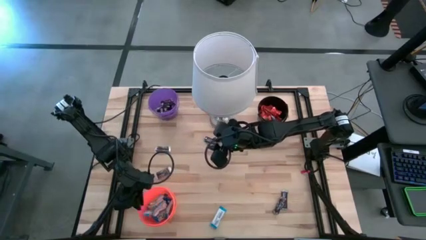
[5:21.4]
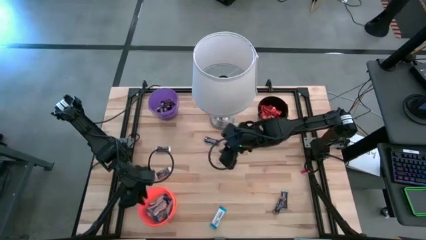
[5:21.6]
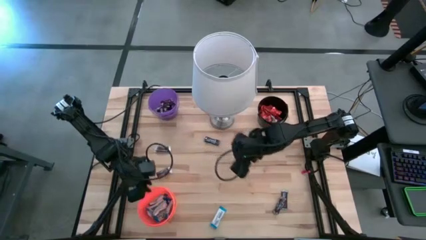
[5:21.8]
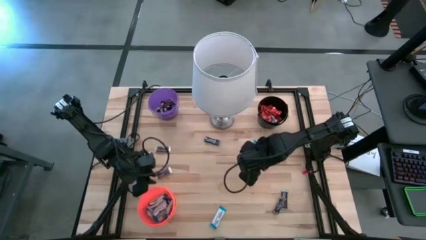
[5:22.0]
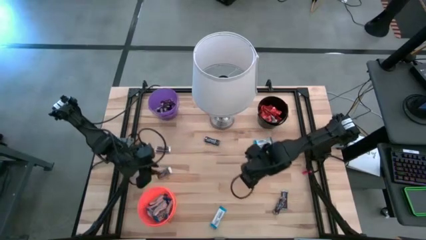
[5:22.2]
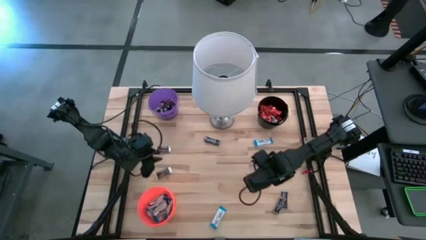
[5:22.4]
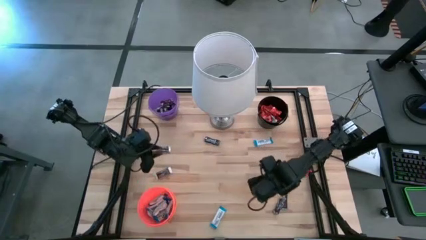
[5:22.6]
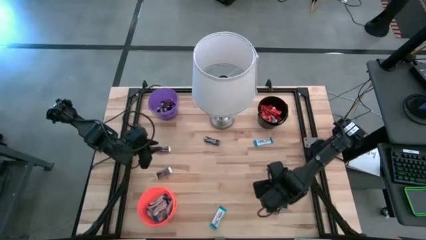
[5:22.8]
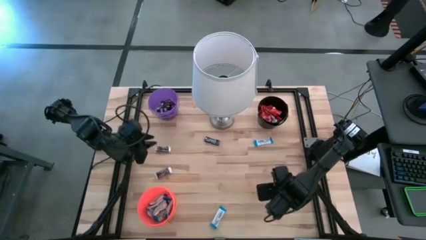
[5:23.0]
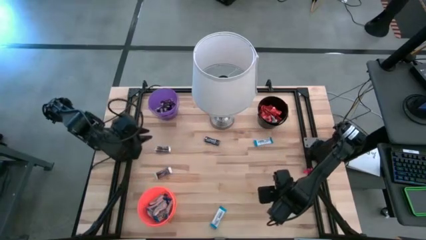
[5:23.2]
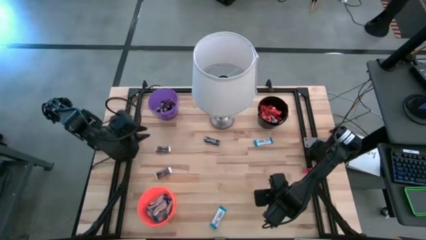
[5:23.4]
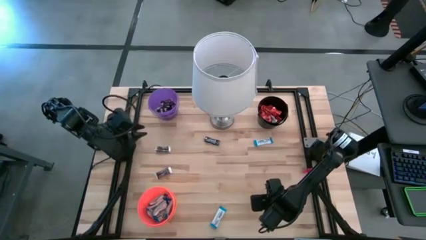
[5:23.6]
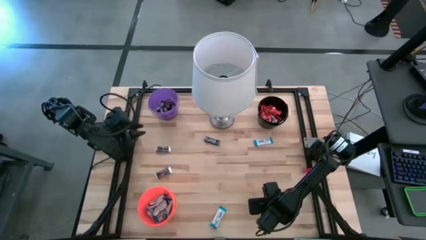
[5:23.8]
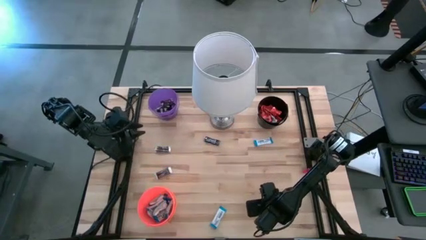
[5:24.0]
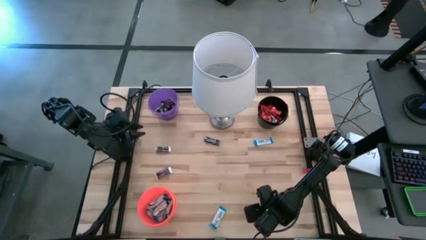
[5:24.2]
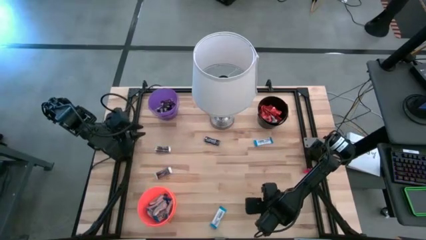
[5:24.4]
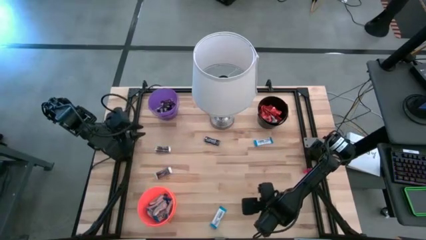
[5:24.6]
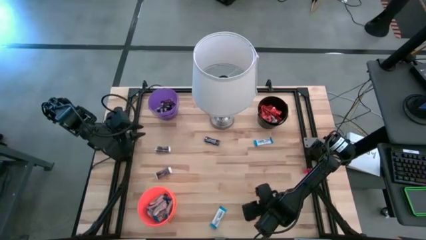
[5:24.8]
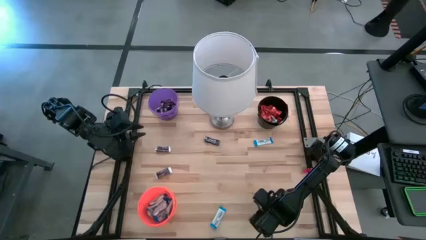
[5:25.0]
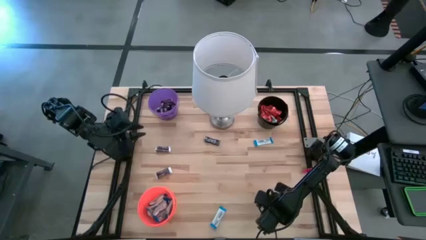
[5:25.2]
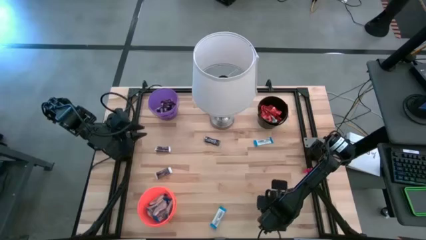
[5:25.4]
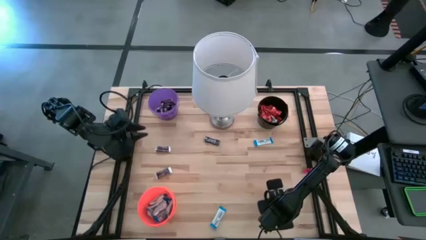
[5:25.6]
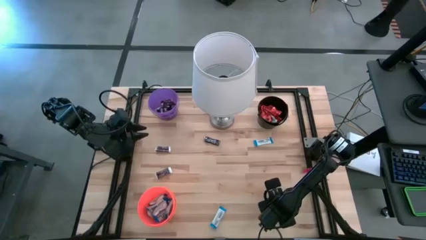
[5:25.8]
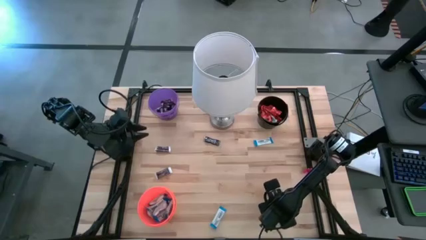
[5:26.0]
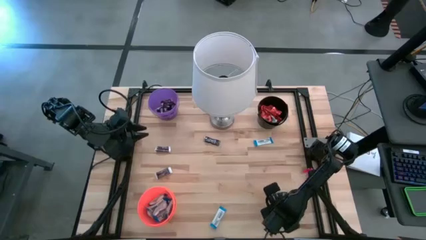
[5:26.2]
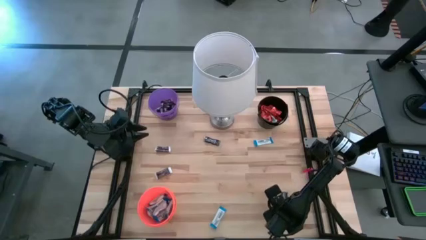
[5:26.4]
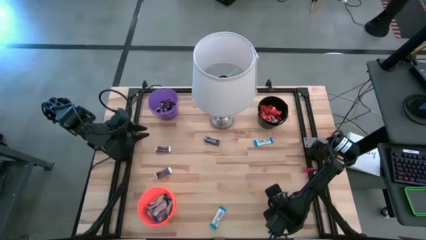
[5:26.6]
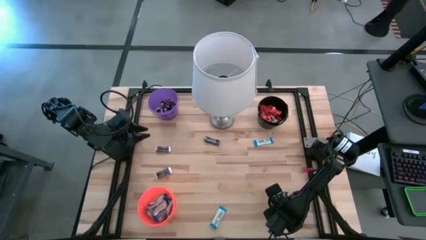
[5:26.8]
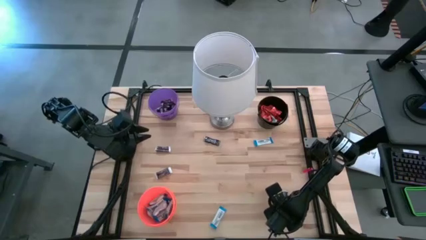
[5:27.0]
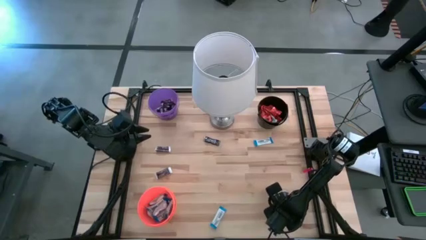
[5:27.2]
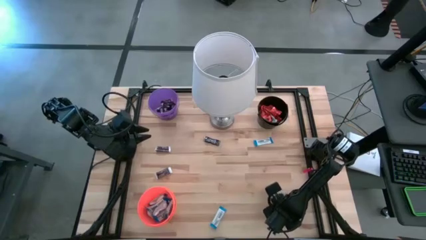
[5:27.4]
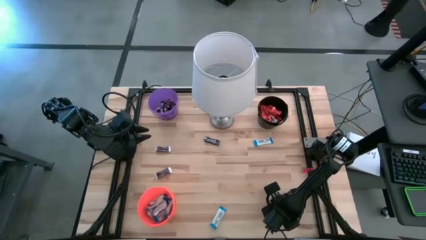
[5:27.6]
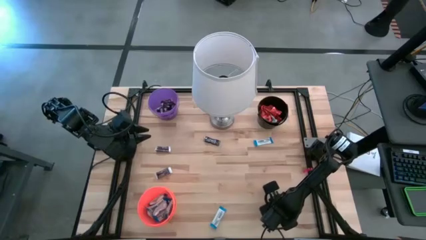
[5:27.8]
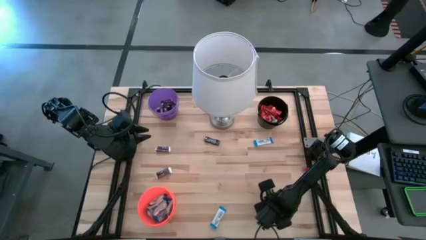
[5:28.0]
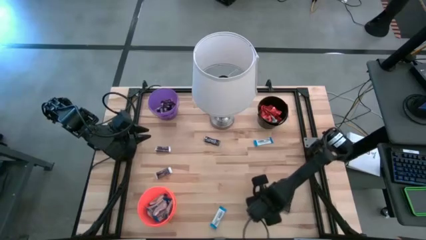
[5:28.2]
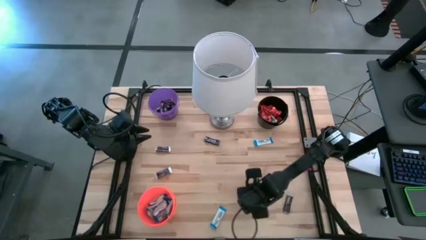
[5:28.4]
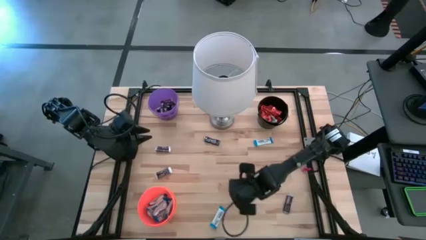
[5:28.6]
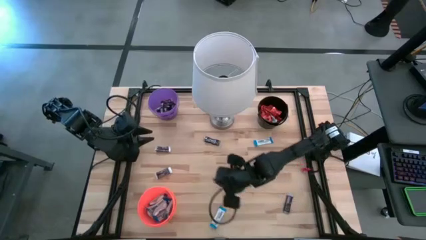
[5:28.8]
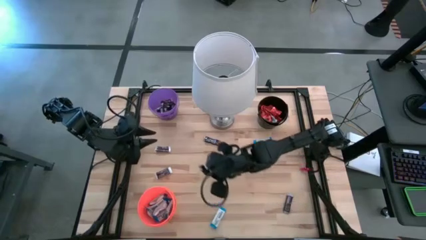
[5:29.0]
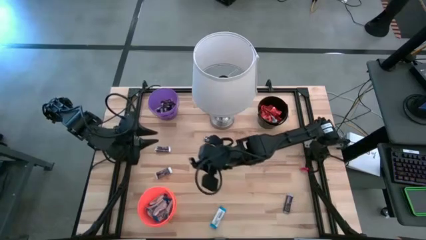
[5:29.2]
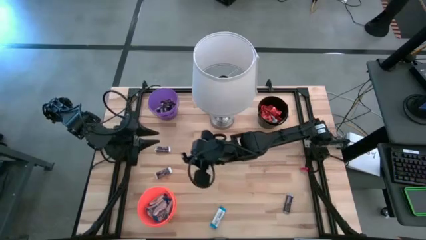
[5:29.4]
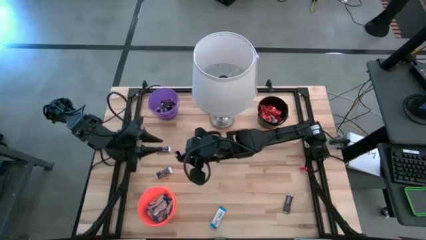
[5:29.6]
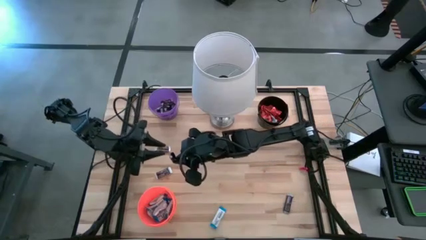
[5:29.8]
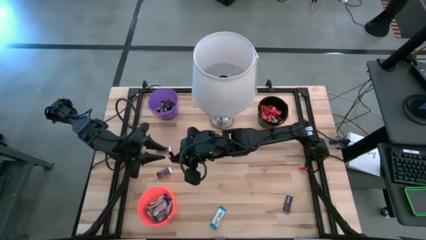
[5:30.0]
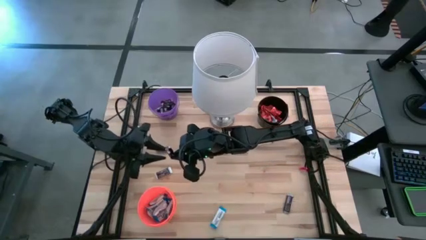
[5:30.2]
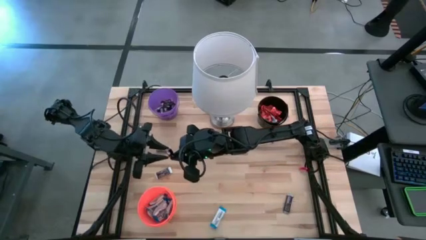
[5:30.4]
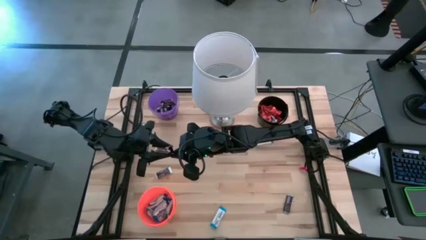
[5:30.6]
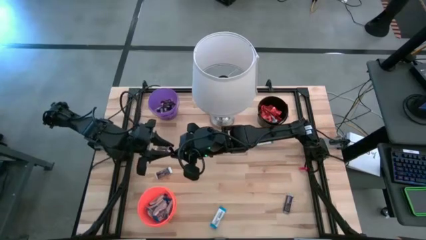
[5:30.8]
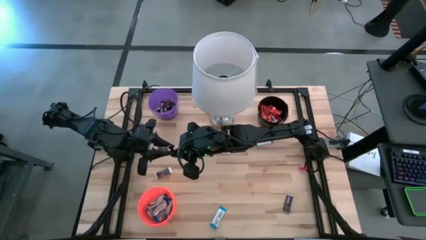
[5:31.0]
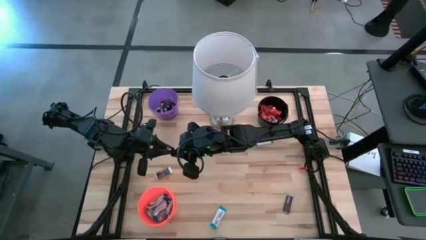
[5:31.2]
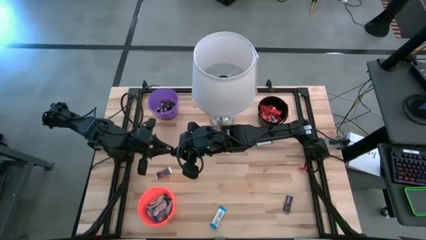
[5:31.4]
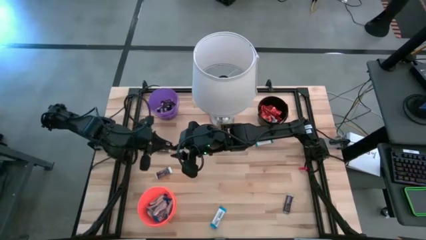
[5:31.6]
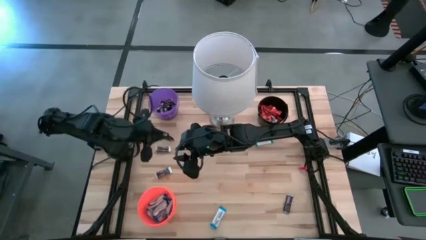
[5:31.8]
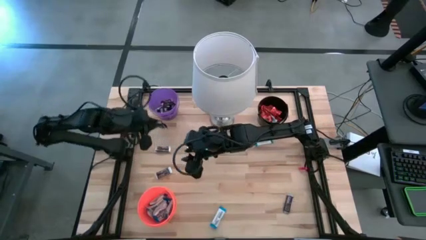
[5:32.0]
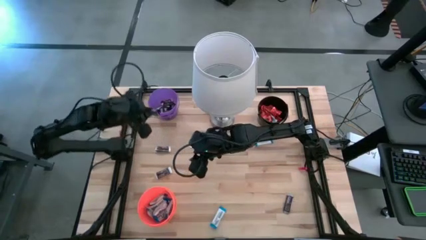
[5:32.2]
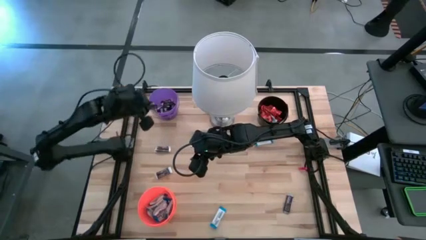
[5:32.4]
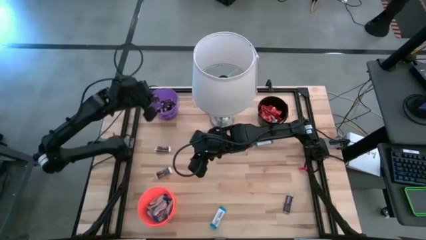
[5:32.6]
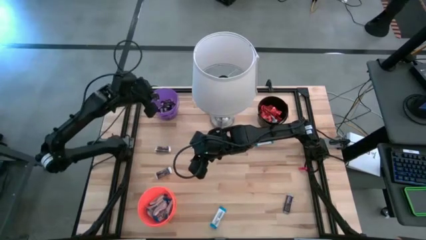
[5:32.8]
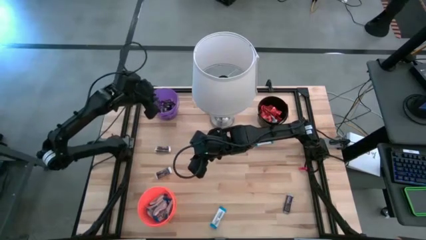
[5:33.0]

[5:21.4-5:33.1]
Task: Organize candy in baskets
Put the brown chocolate bar into the purple bucket

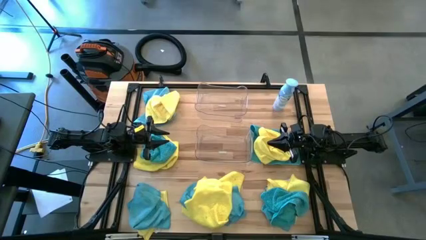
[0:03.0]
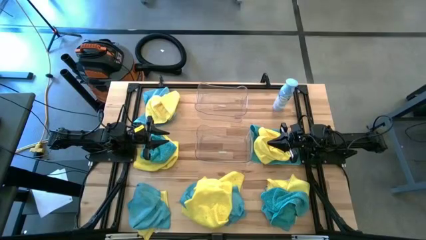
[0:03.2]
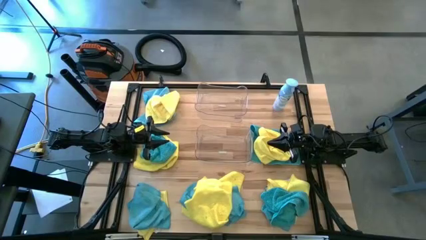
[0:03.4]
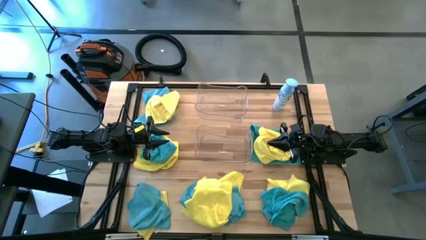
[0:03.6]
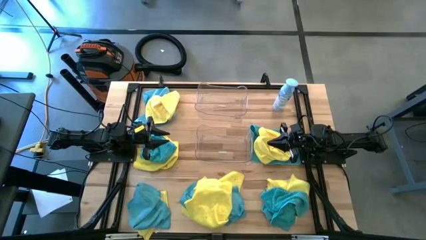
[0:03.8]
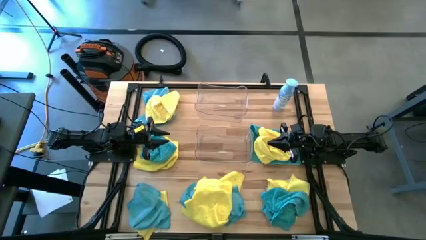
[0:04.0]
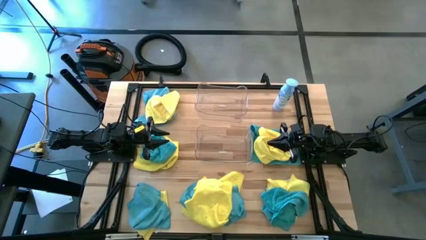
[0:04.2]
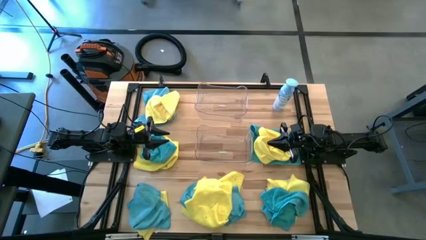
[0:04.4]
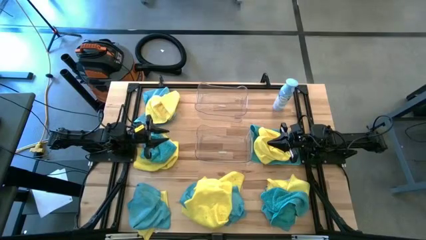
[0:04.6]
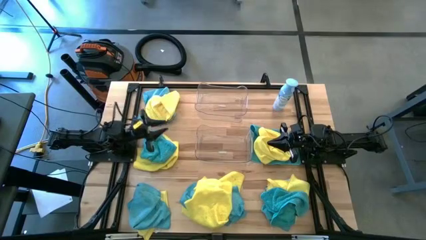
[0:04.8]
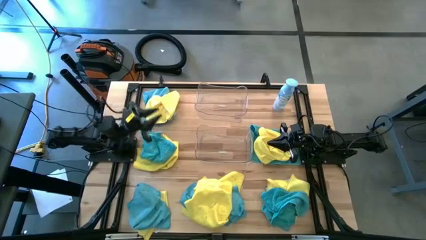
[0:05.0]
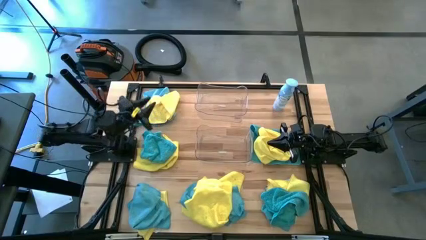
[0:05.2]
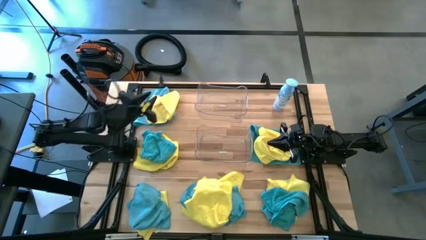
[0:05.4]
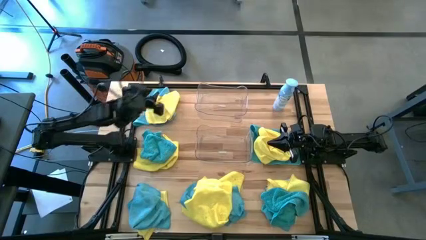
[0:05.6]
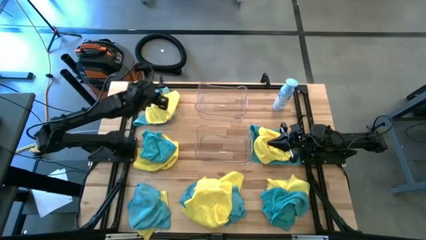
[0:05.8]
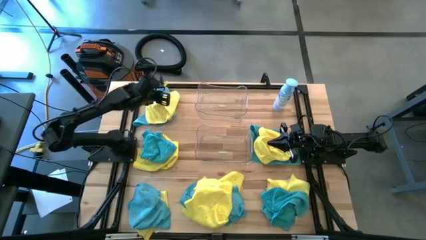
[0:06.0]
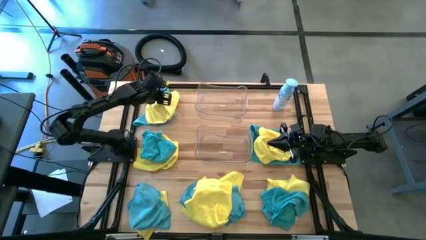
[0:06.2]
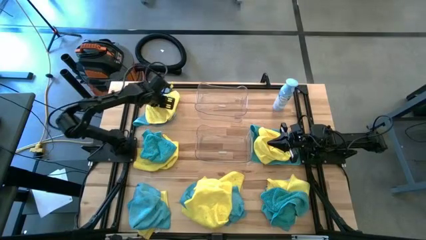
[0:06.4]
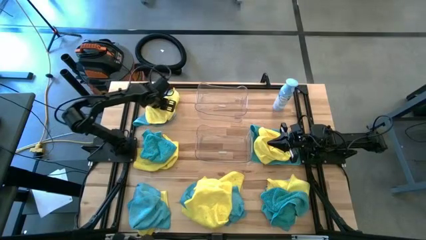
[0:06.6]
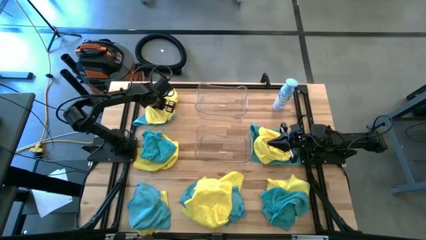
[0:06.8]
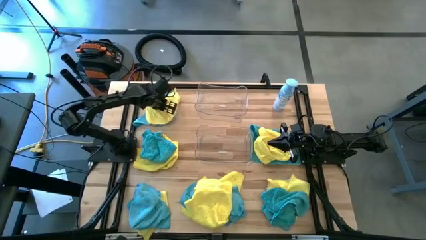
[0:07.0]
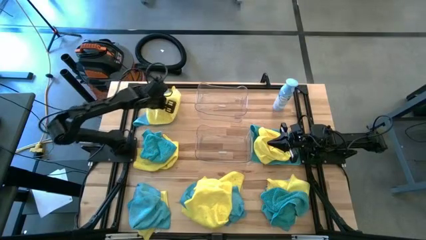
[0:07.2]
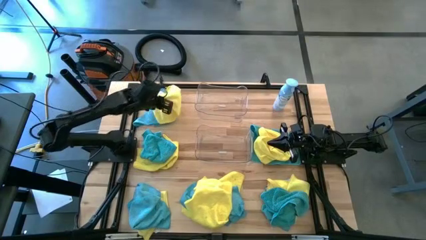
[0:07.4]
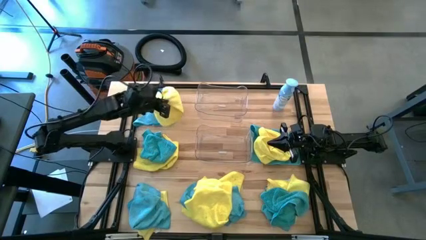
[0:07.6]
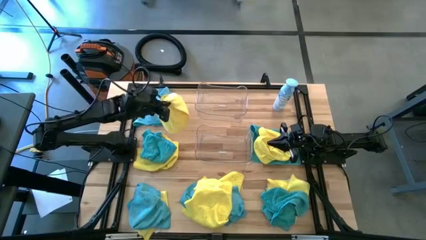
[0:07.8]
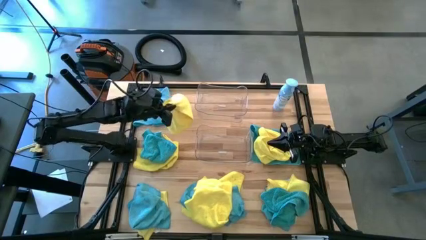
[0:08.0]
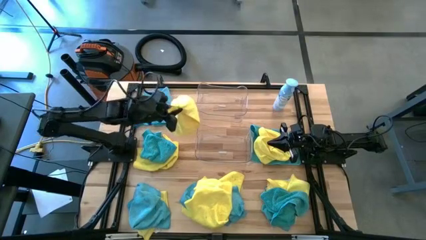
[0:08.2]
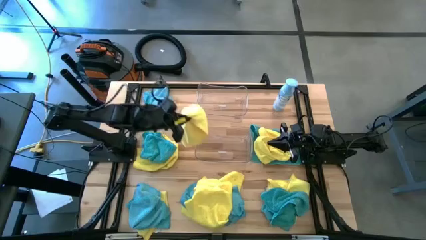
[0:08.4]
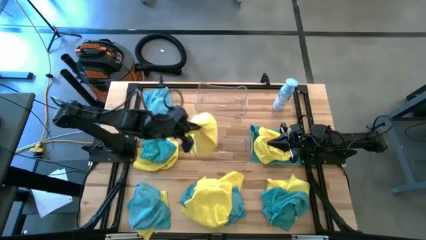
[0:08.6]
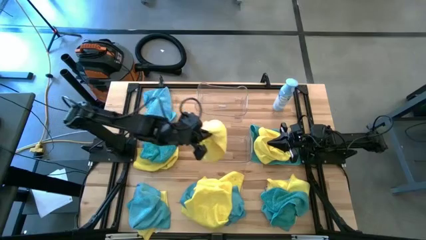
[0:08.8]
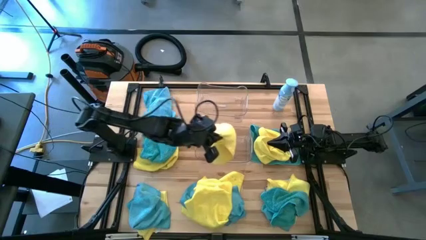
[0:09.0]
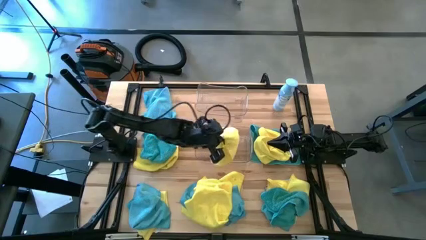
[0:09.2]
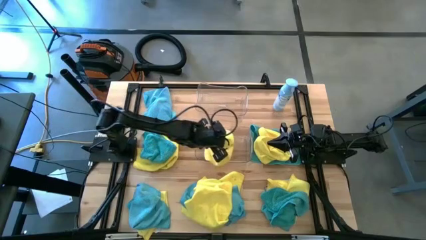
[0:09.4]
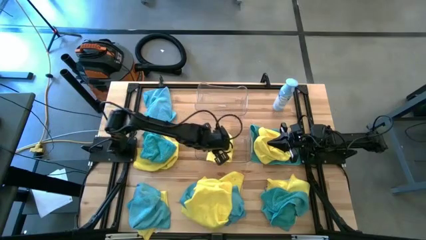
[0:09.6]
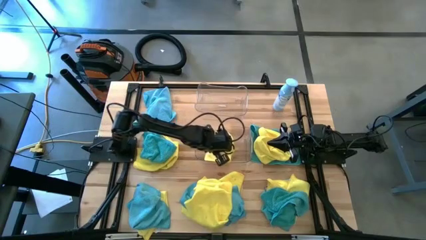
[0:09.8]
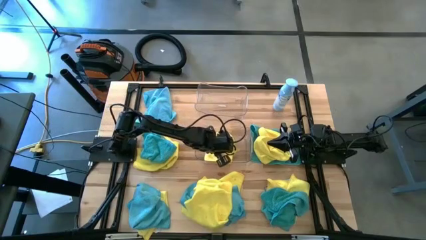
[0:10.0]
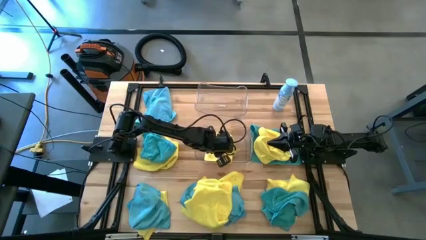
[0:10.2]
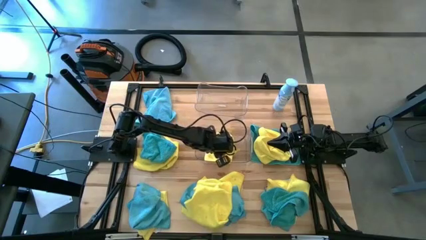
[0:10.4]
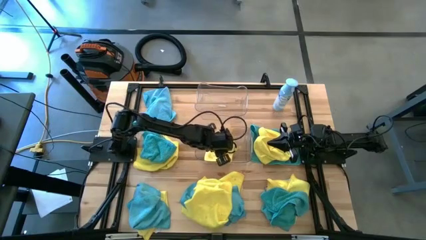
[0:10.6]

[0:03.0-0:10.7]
Task: Sort microfiber towel by color & place in baskets
Put the yellow towel into the bottom transparent bin
